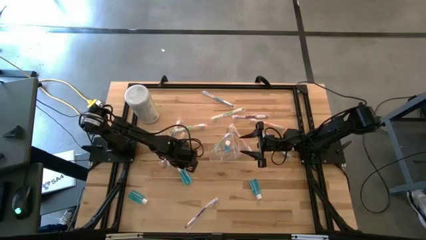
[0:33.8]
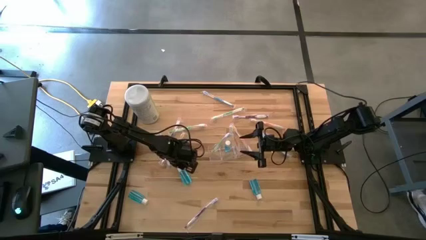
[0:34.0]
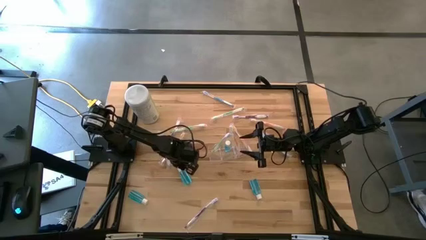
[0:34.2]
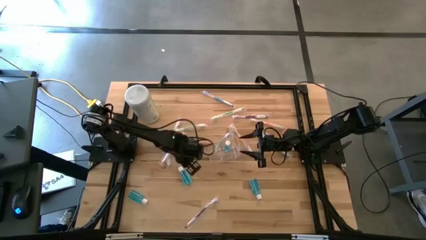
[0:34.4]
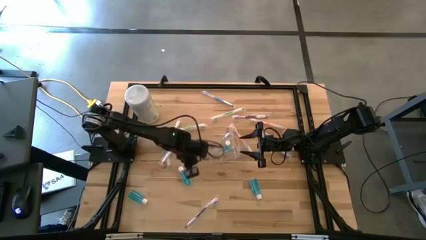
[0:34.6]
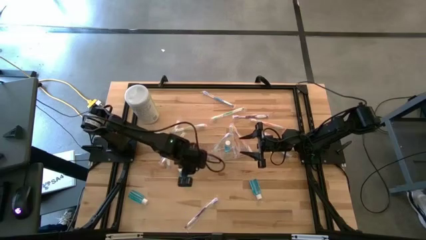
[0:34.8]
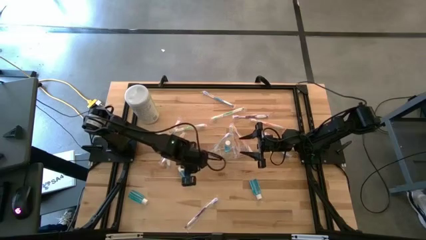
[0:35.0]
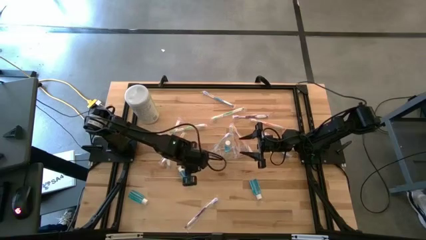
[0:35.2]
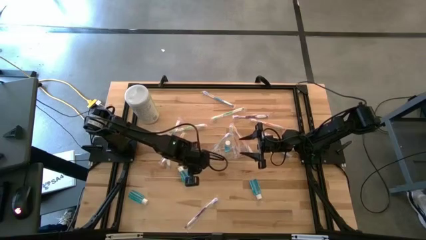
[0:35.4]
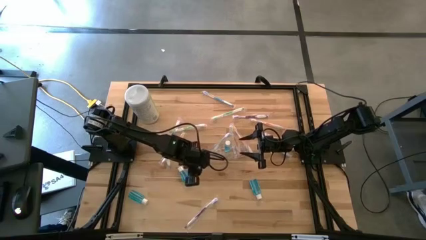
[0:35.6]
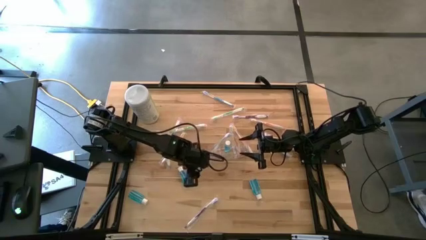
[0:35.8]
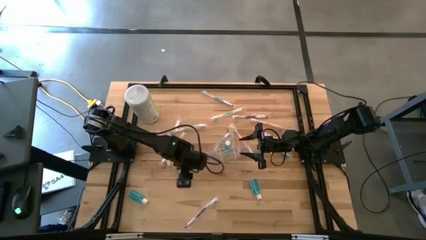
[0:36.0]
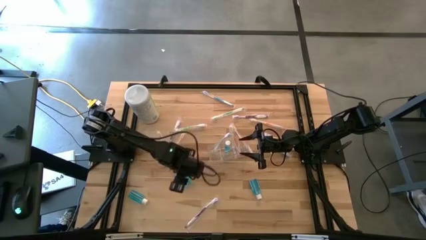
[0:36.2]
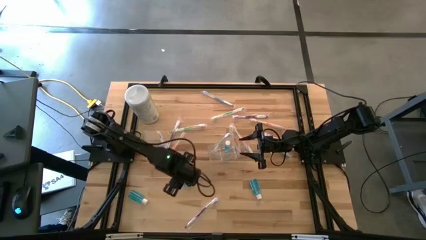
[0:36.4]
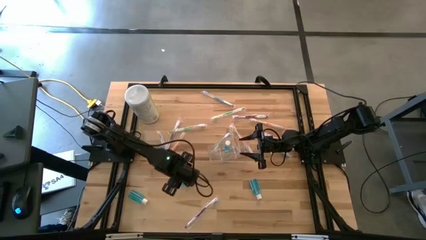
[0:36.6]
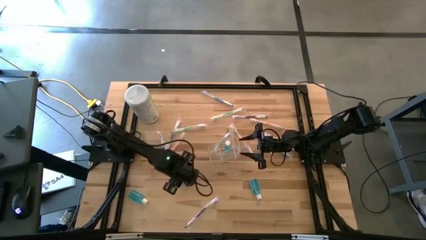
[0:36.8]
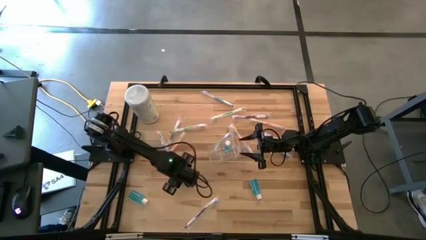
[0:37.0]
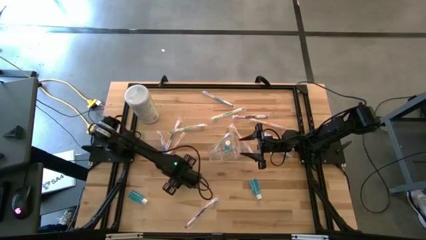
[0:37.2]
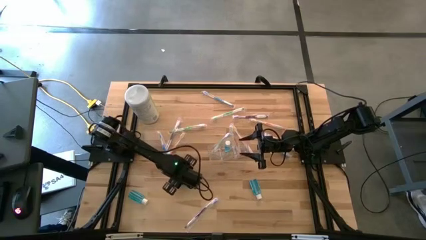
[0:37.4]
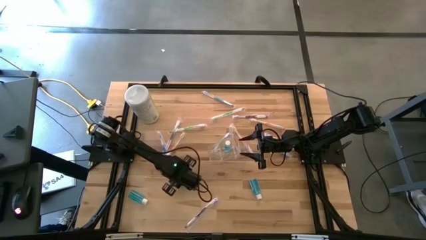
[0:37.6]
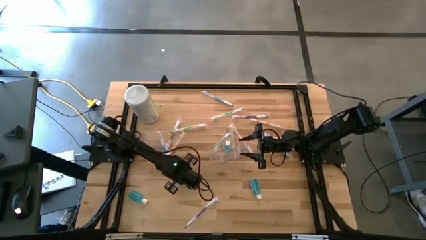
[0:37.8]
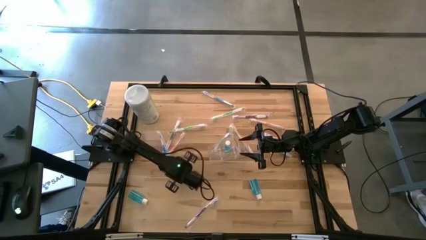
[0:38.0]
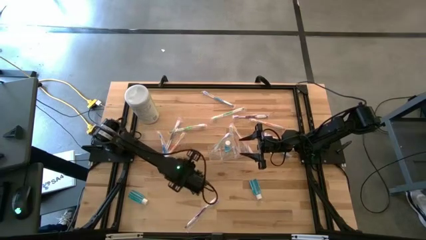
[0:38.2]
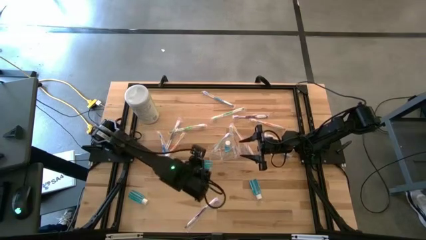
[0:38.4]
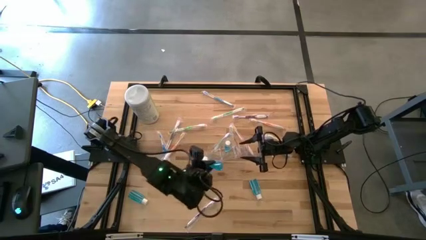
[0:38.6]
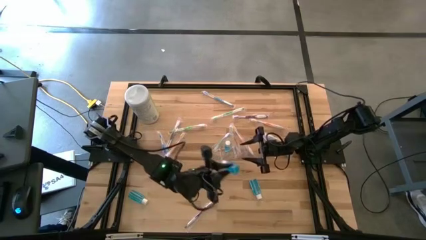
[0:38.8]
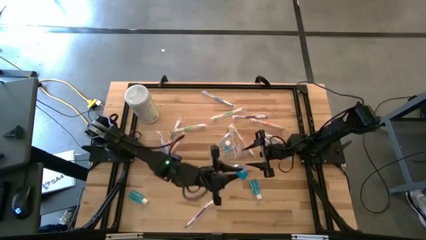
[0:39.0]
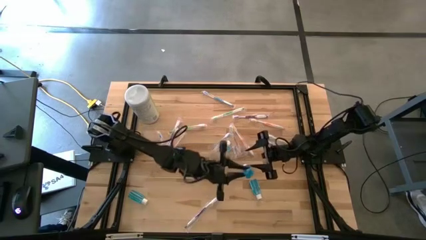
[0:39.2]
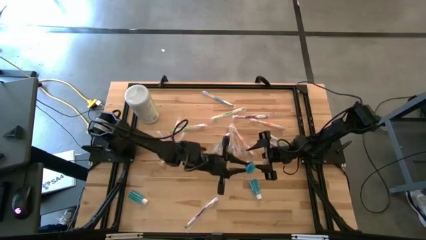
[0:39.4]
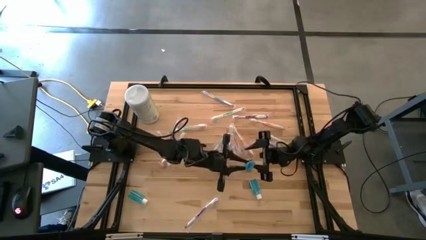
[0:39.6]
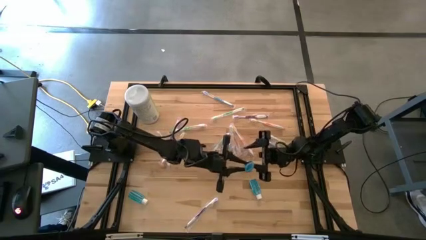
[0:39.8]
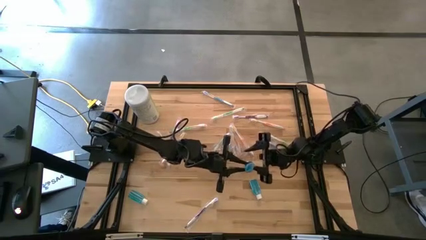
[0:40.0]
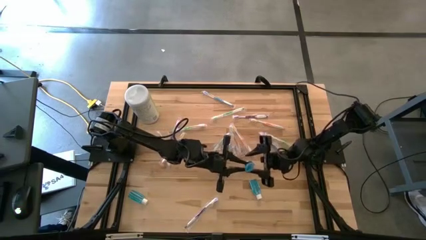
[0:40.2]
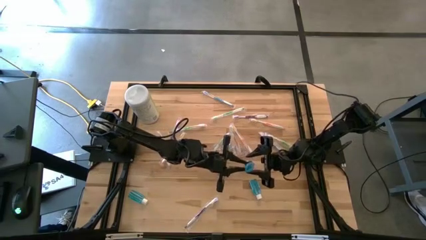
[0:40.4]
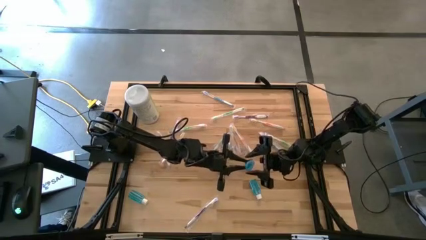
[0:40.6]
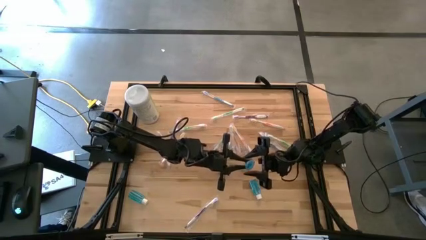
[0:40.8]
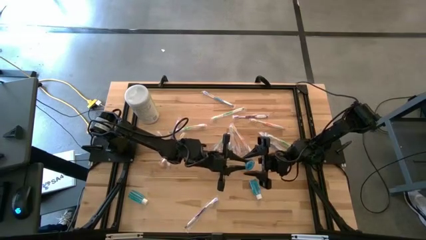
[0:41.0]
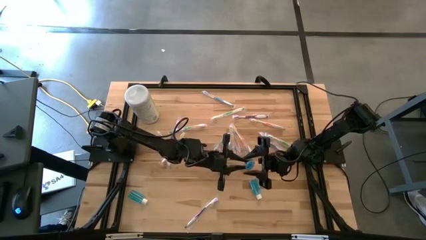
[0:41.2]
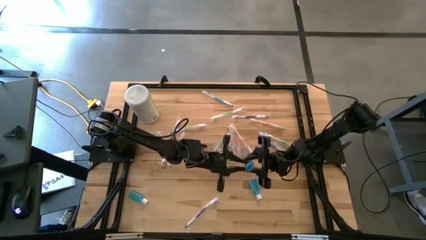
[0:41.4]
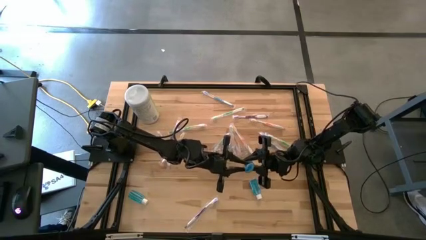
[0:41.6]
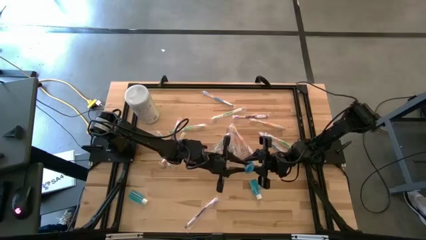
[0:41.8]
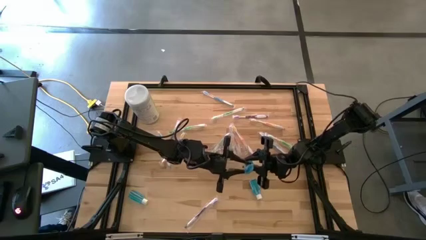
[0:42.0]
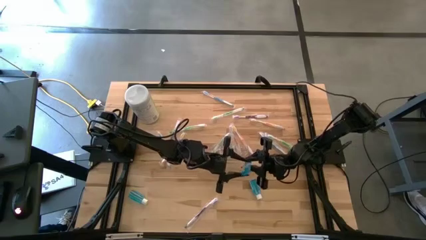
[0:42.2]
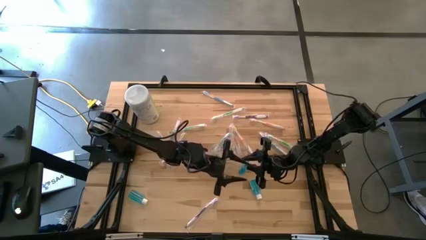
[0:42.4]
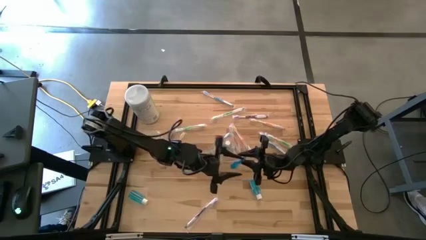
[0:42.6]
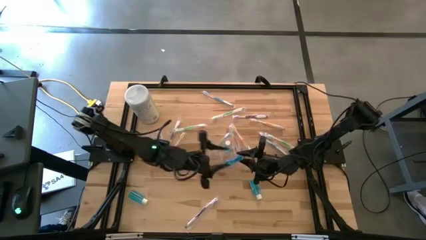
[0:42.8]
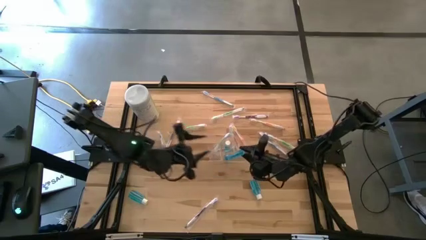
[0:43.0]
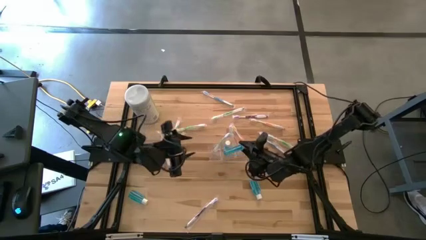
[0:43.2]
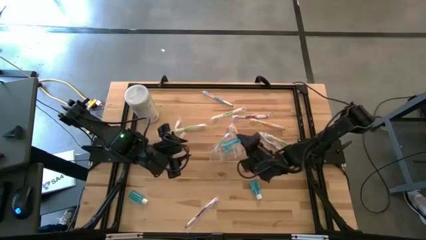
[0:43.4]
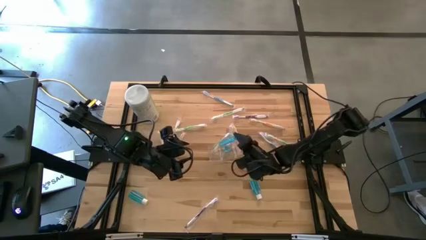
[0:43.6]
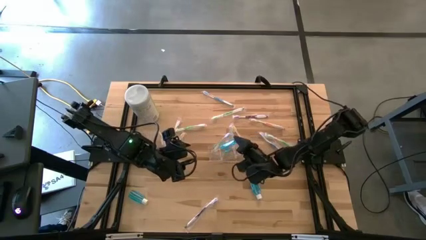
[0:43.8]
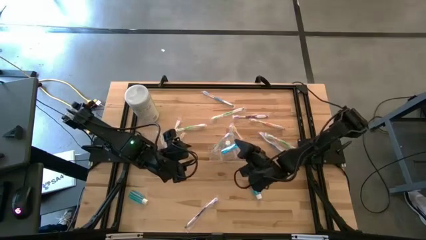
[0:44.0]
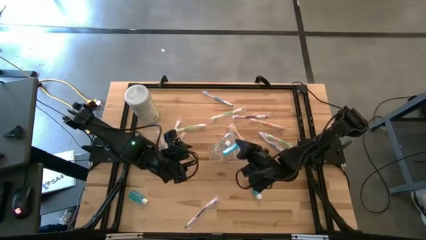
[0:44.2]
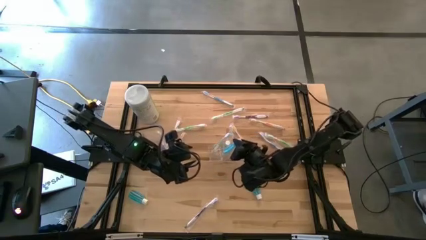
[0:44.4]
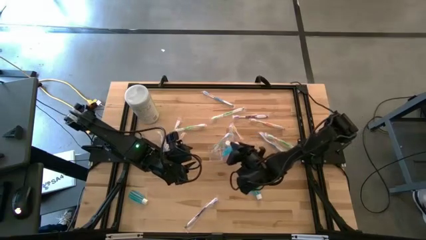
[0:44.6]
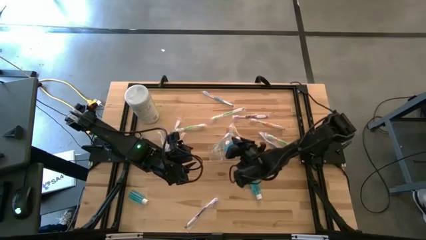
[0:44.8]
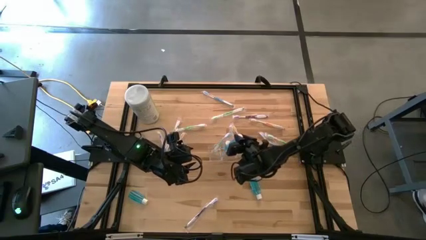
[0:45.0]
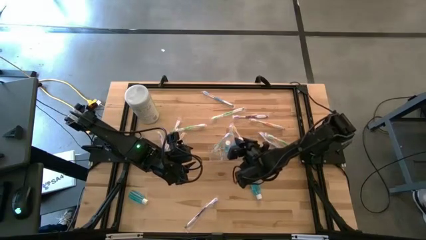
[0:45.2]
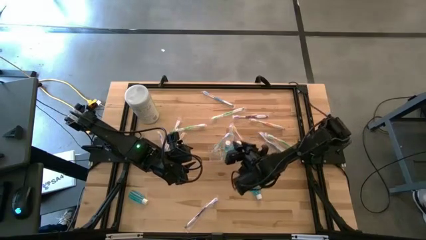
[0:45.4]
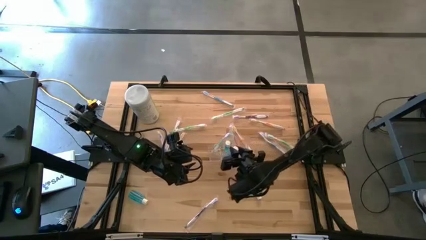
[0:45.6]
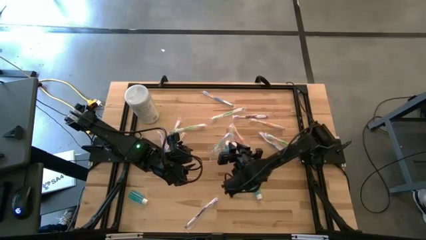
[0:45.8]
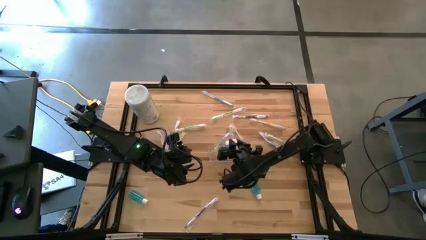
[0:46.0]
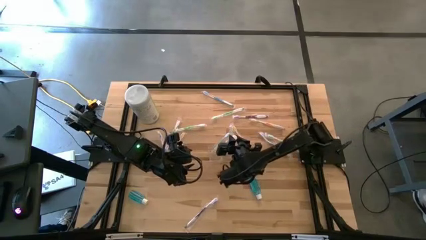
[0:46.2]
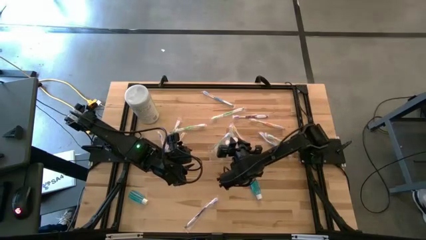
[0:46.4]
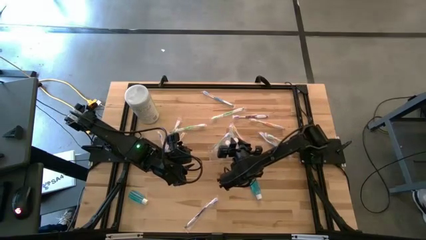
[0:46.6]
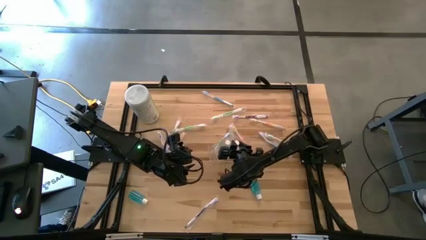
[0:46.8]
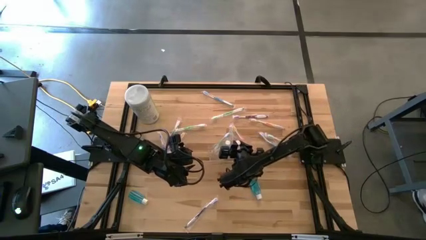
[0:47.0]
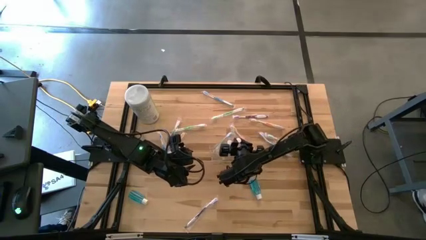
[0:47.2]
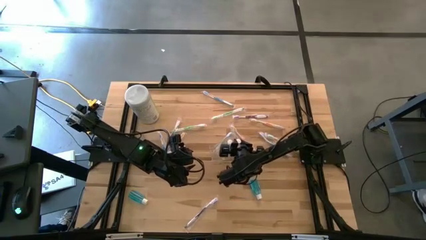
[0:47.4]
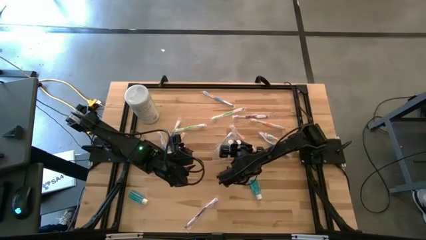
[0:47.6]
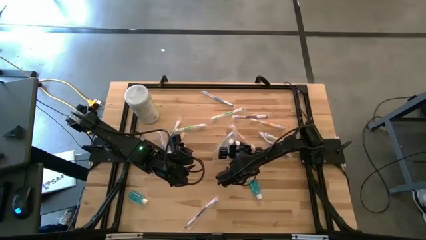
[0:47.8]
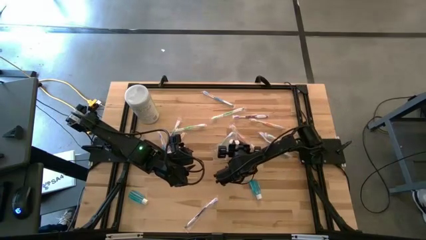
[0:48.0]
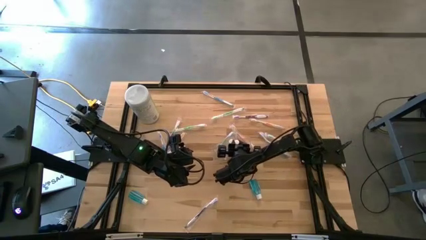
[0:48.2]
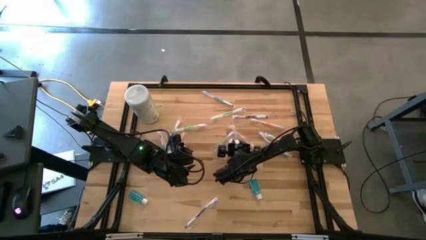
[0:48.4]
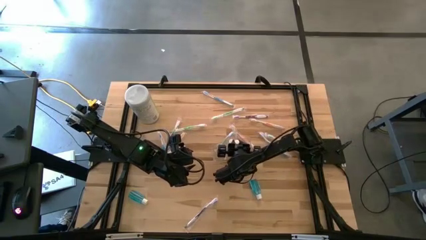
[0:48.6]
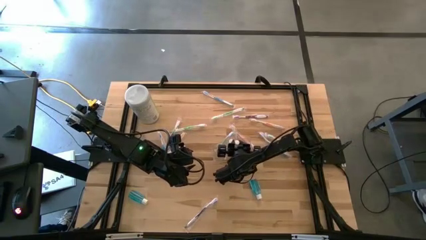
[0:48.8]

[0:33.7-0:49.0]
Task: Pick & Place toothbrushing station
Put the blue mouthwash into the transparent organizer
